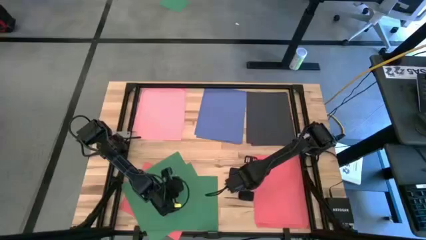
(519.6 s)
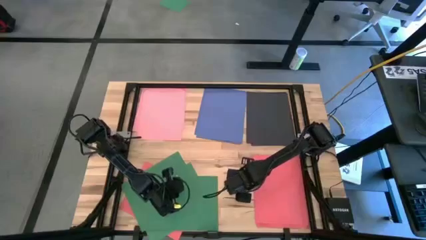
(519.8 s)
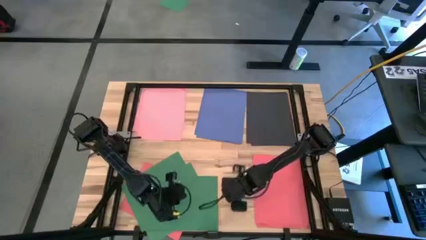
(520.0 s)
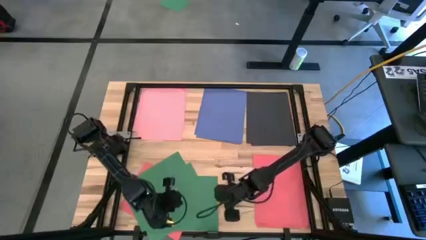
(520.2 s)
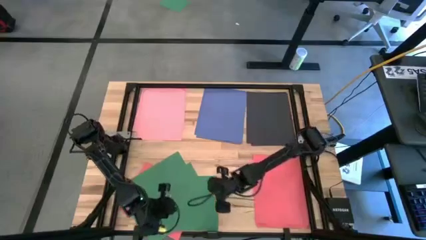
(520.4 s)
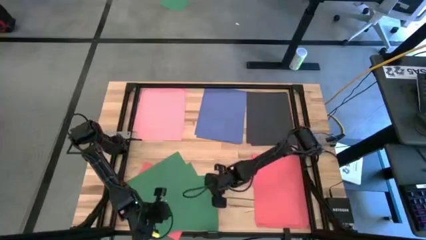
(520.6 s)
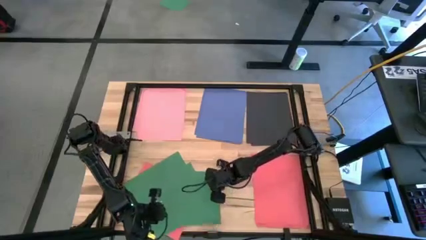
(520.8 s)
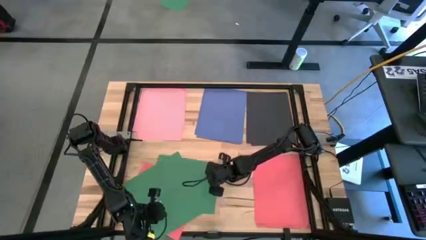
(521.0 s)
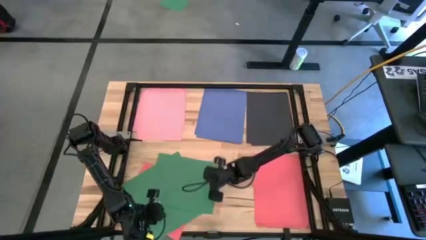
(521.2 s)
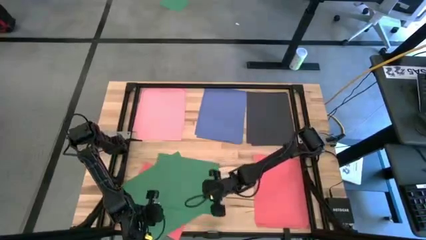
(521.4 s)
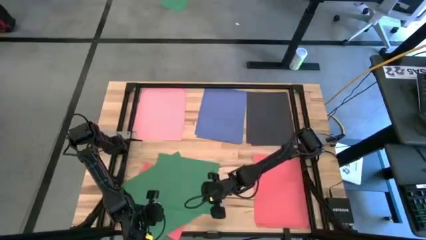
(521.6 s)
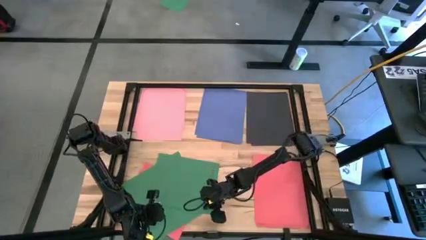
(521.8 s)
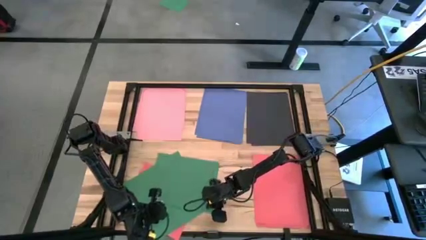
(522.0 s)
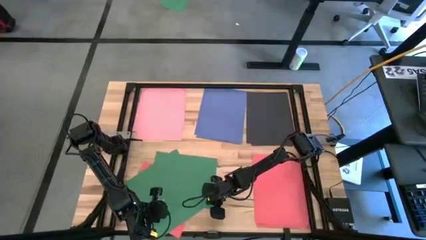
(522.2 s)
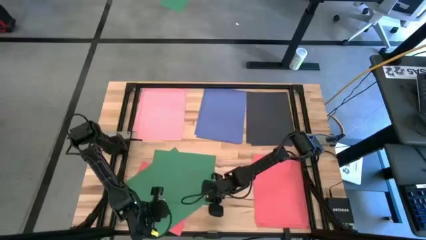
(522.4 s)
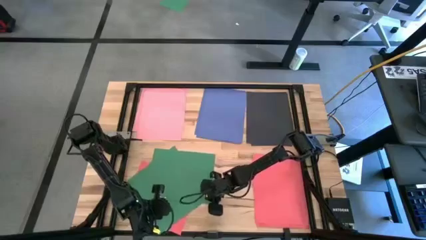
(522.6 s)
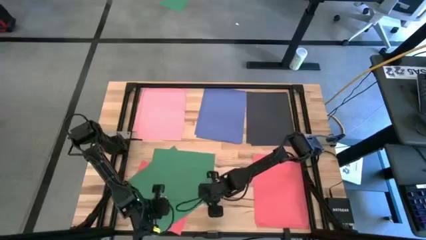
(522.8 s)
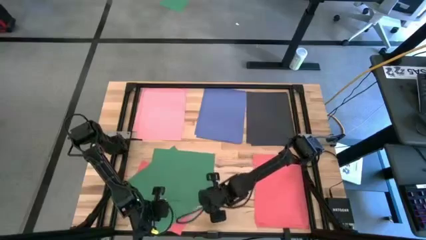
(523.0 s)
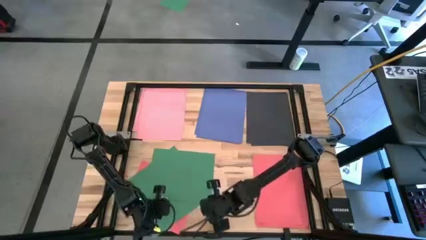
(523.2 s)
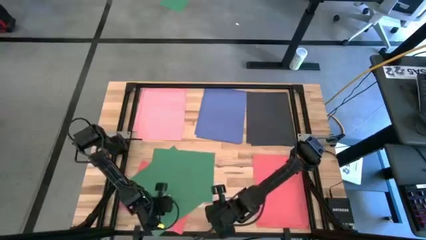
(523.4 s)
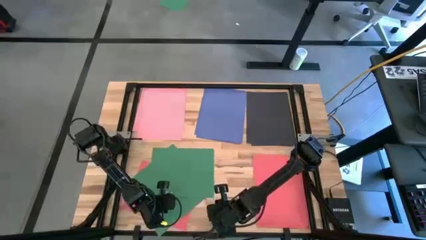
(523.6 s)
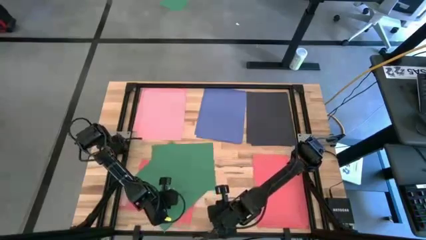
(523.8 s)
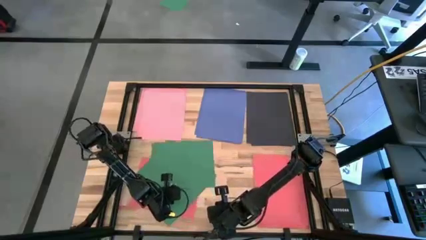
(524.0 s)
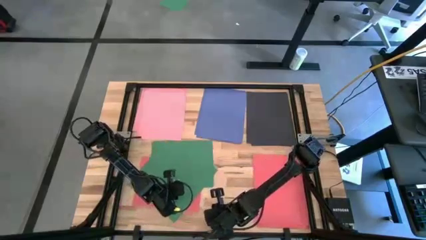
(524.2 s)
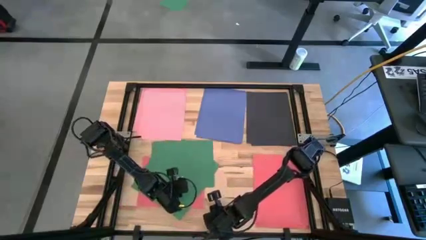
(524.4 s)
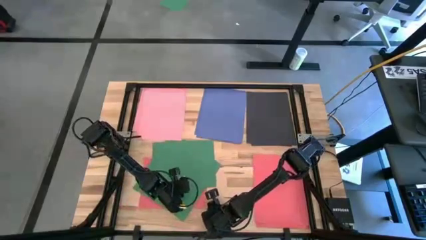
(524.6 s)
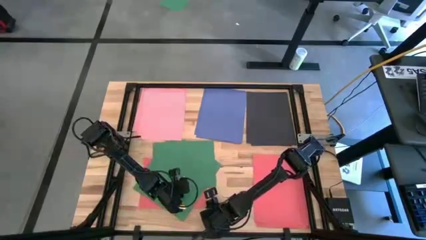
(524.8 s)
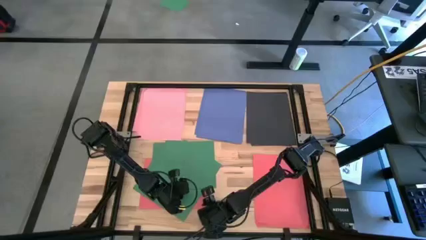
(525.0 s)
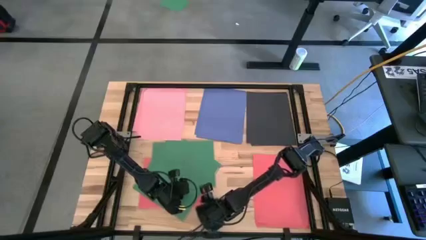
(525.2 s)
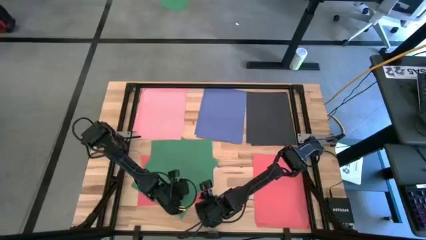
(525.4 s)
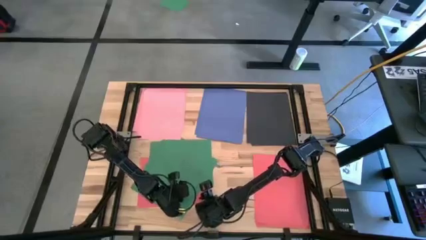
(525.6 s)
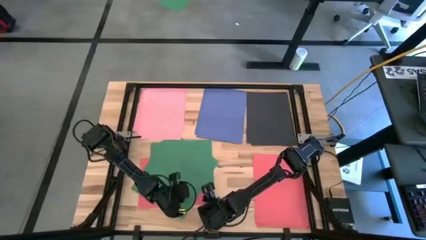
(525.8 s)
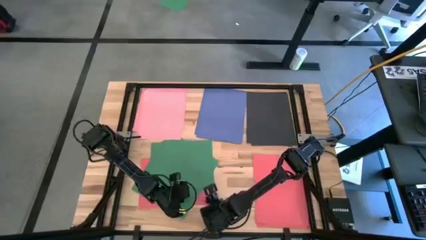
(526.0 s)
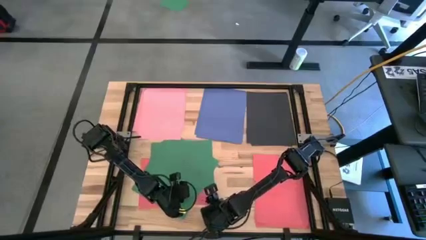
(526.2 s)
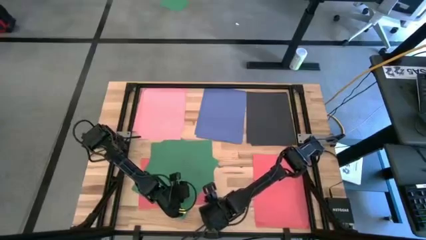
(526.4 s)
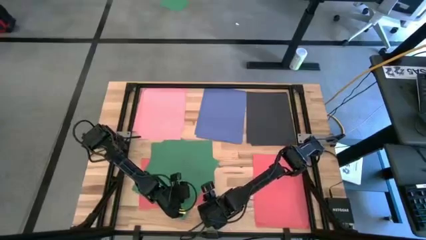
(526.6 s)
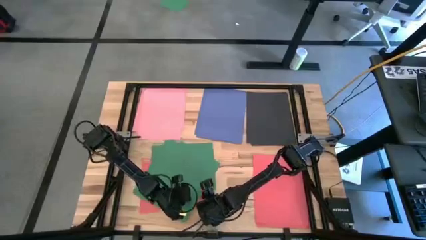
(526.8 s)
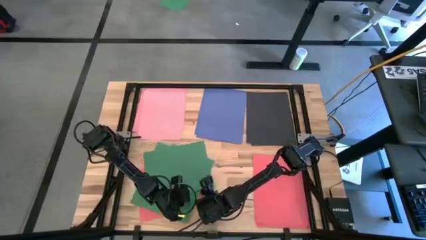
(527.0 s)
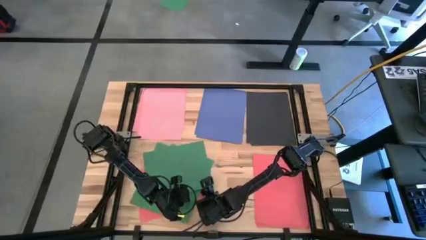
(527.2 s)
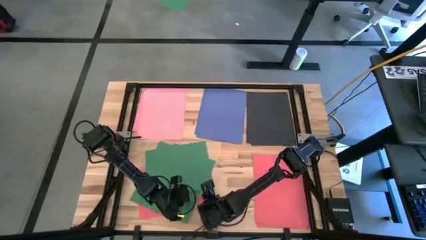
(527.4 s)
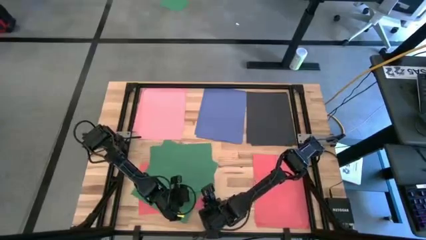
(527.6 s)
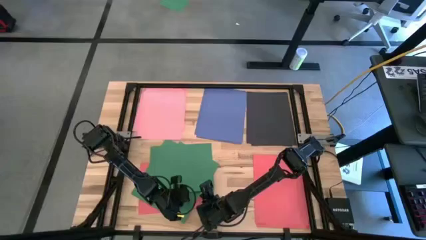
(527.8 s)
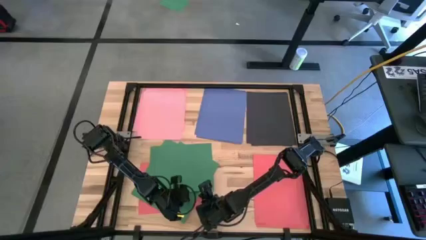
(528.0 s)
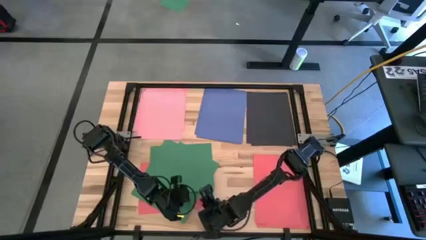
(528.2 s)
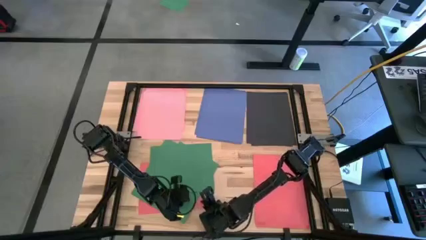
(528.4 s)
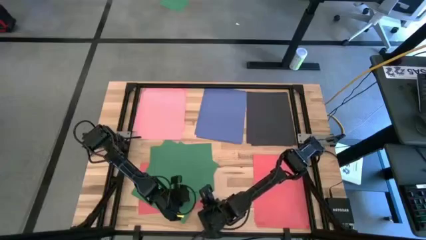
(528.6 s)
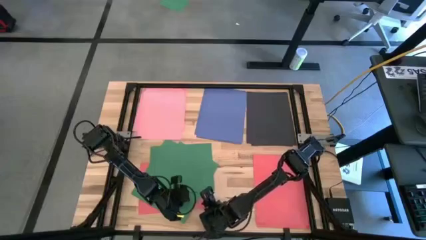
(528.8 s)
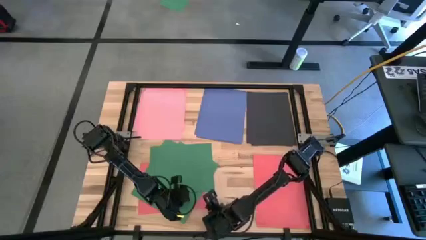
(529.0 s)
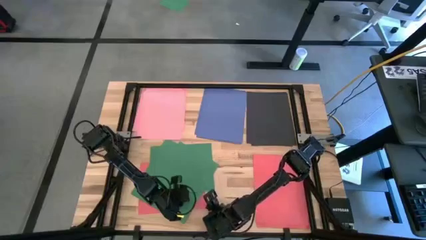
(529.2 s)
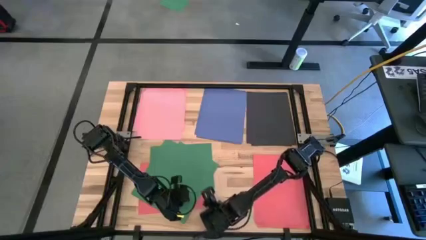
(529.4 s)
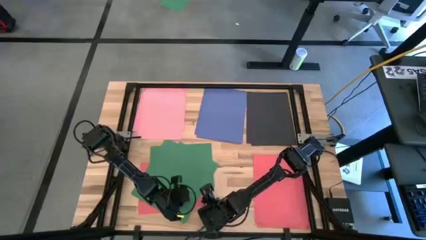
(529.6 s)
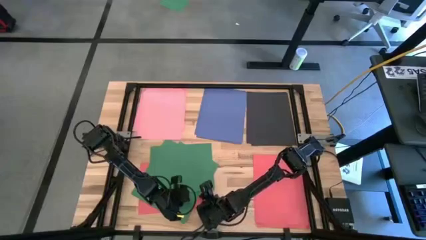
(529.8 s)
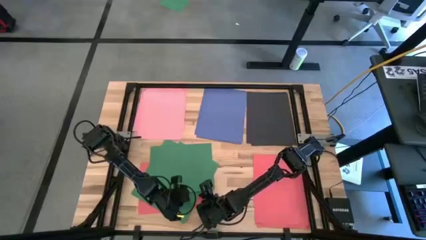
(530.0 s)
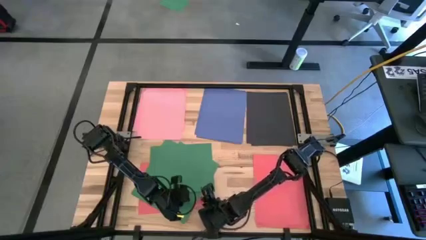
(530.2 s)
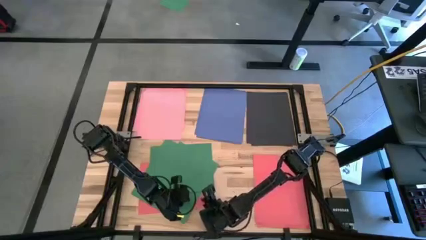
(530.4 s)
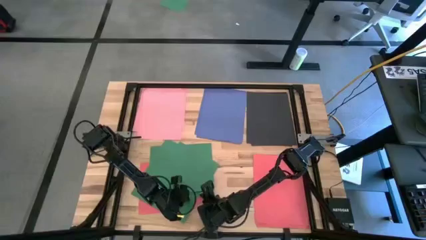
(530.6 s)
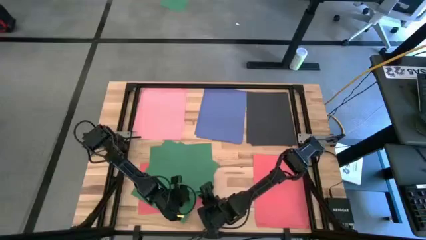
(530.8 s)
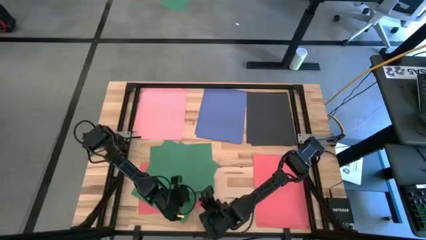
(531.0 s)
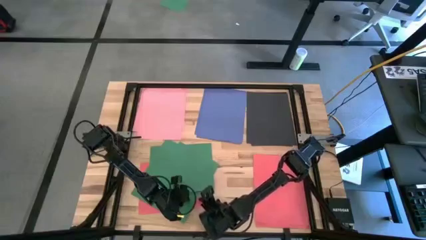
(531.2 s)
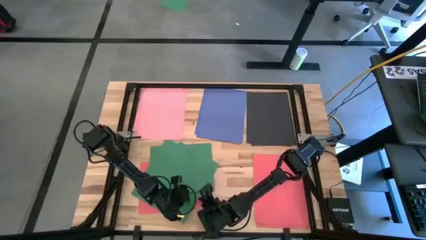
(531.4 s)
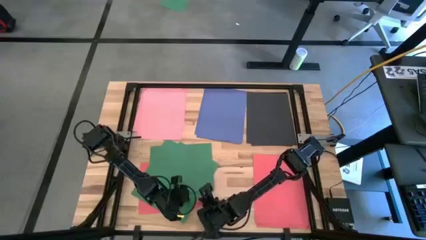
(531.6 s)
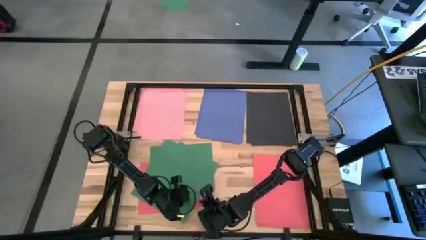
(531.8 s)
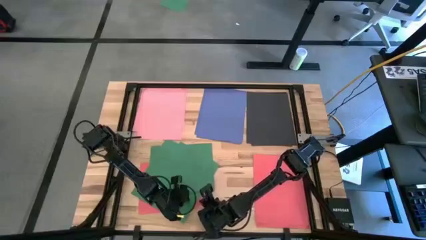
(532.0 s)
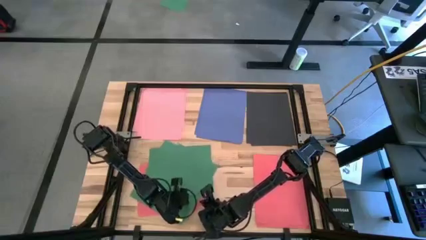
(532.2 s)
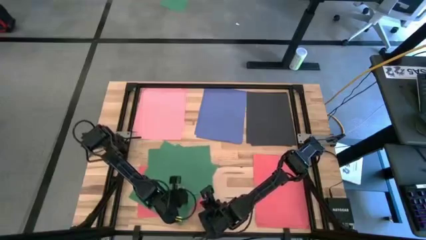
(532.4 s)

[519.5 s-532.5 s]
Task: Organize paper
Stack the red paper on top of the other red papers on the table
